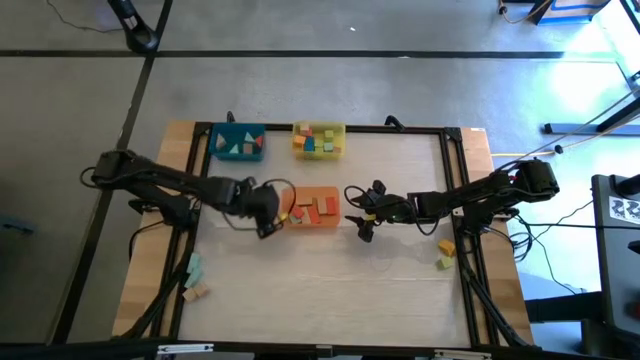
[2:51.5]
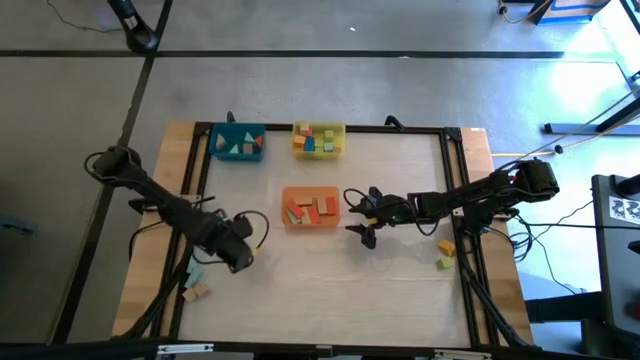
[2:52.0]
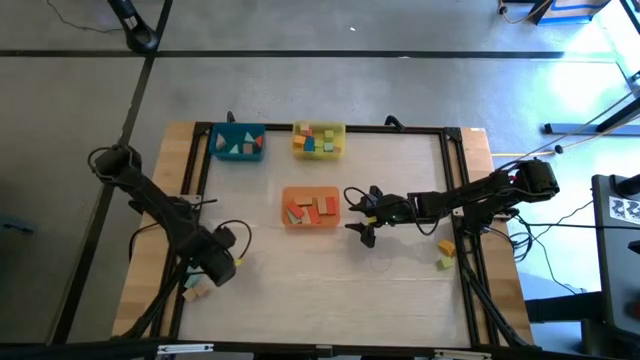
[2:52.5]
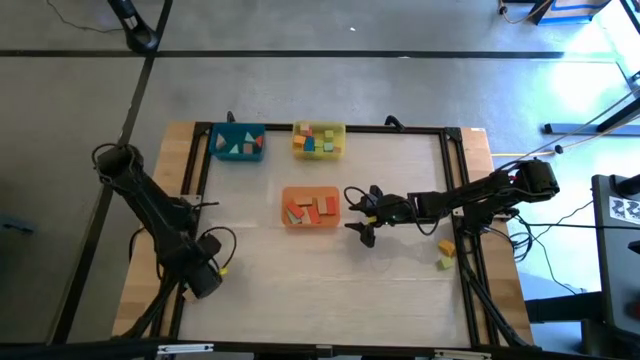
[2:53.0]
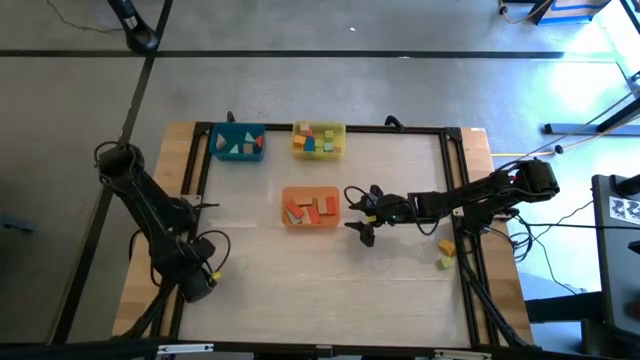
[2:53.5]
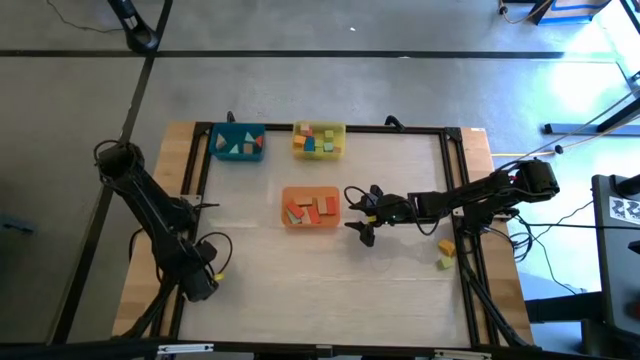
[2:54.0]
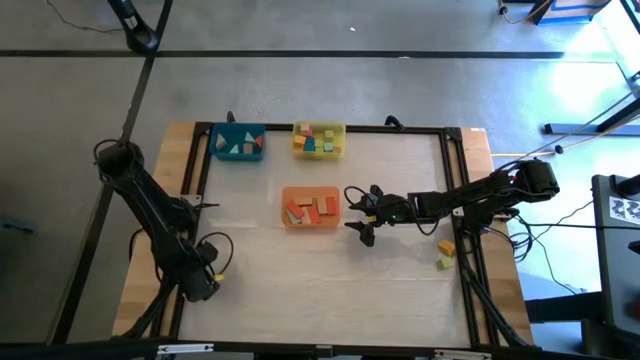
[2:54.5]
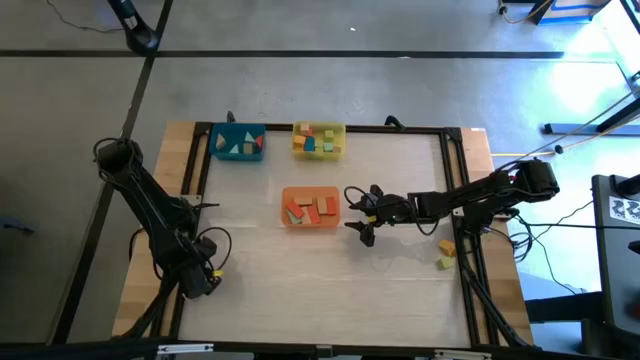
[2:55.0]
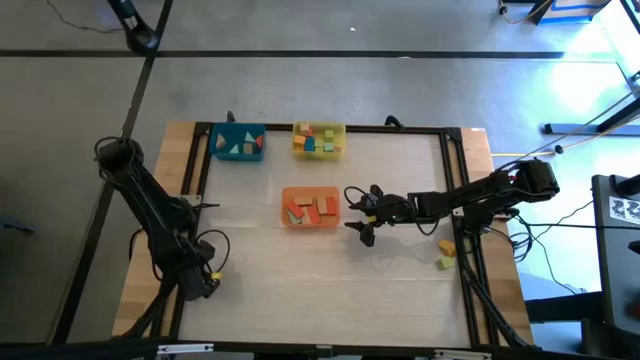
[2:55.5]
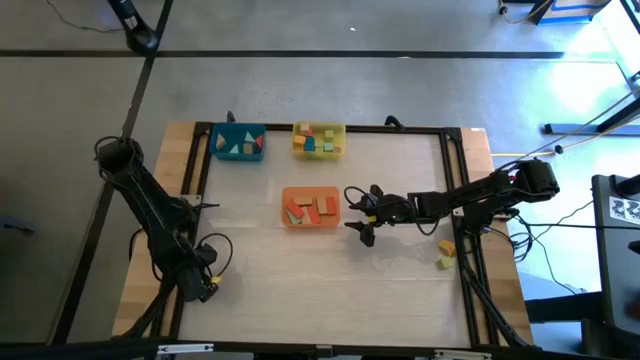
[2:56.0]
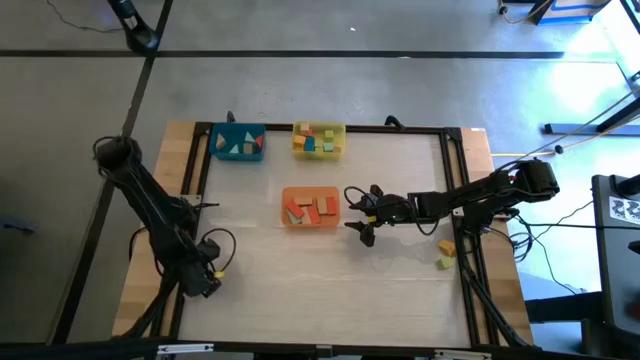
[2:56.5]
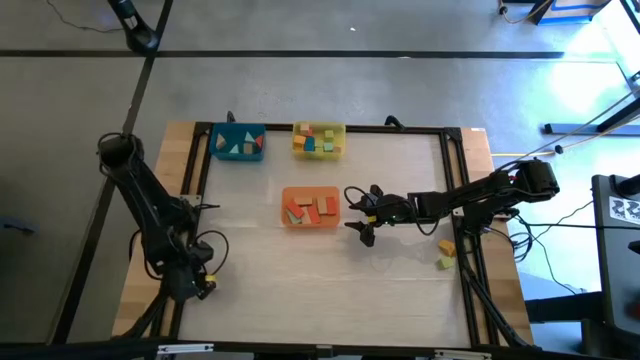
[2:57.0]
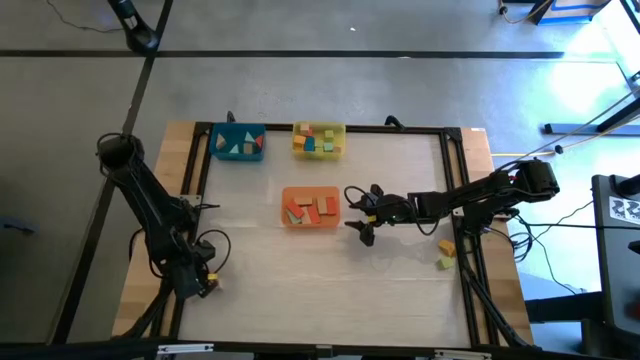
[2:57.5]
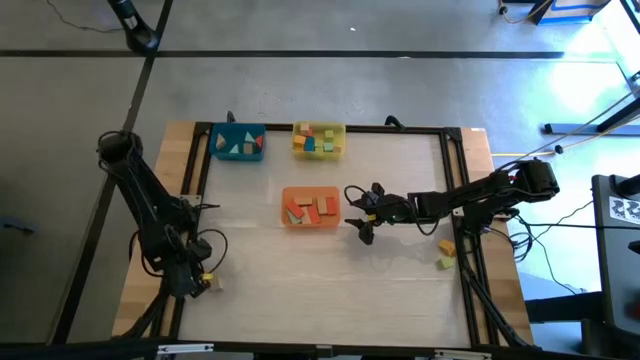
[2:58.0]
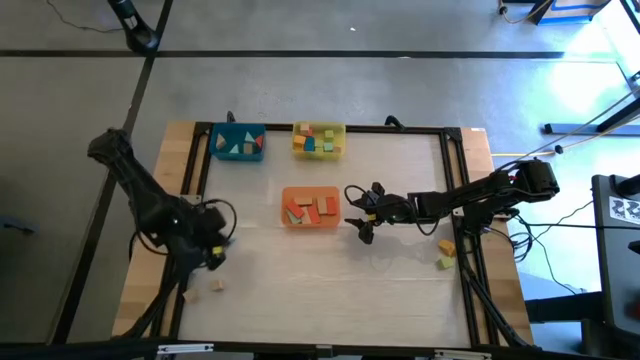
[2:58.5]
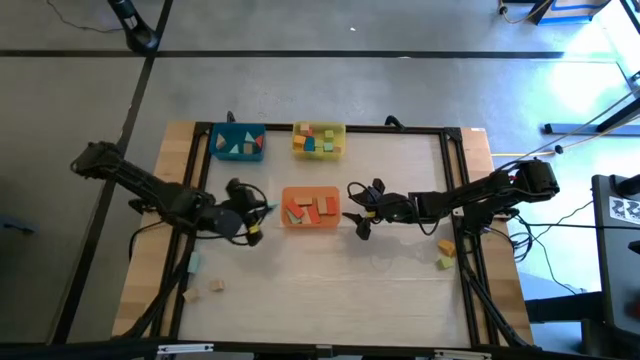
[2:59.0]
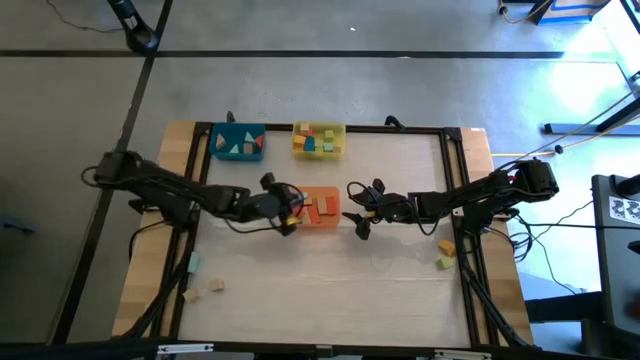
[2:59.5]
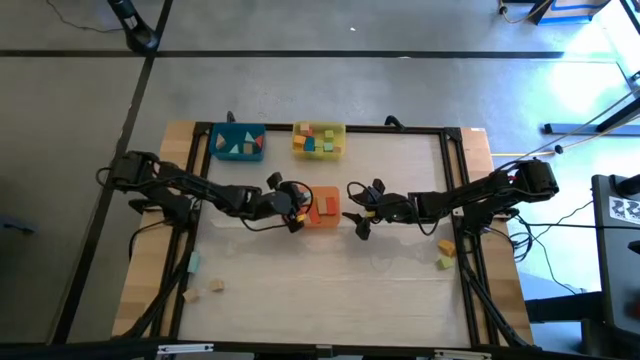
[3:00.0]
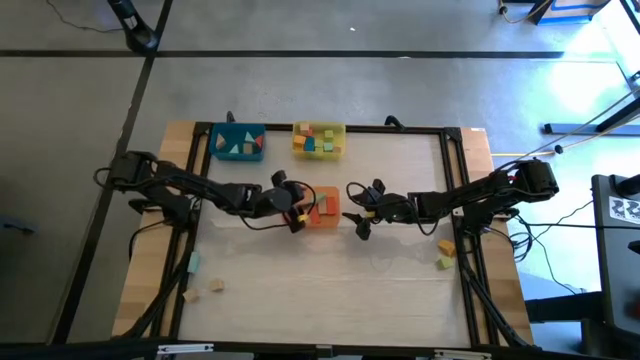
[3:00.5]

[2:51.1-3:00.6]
Task: Sort blocks by size
Put the light blue rectangle into the orange bin

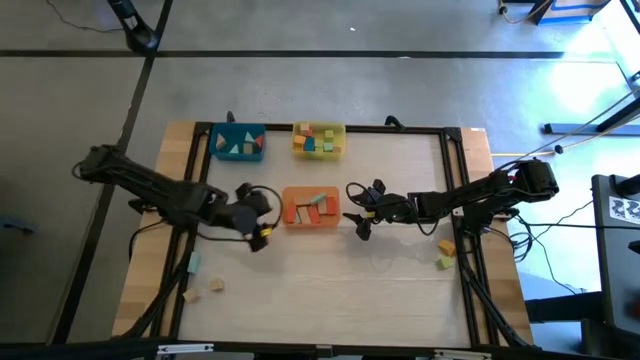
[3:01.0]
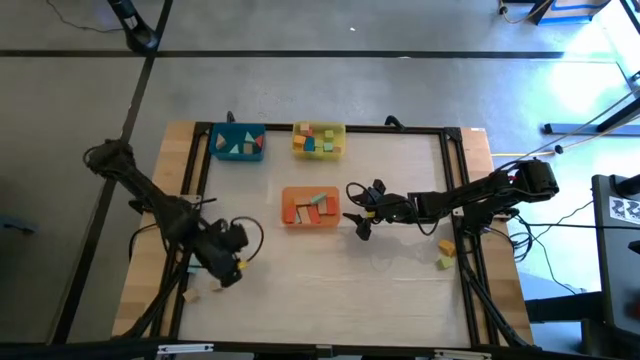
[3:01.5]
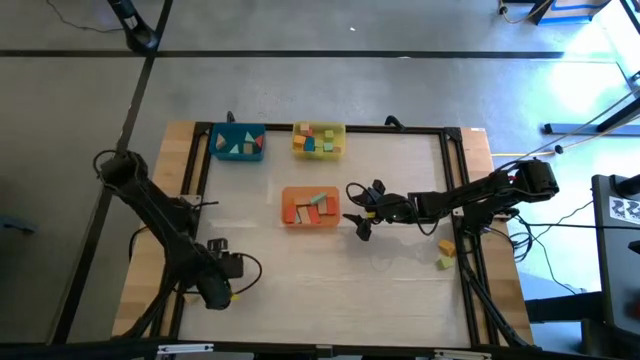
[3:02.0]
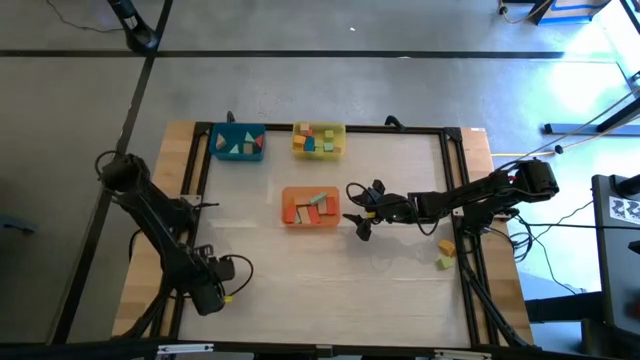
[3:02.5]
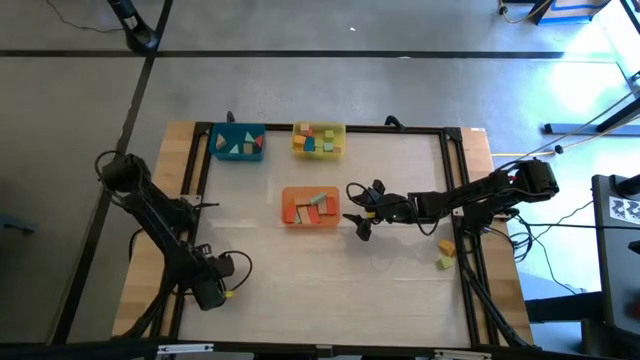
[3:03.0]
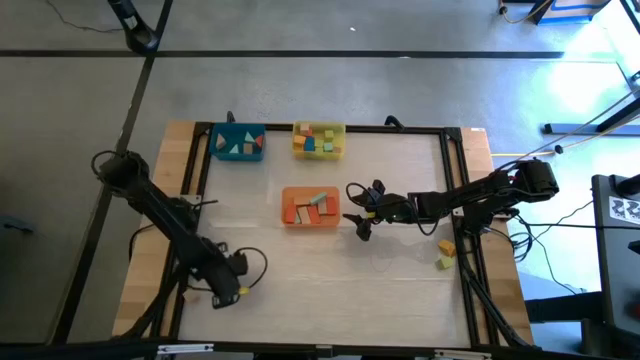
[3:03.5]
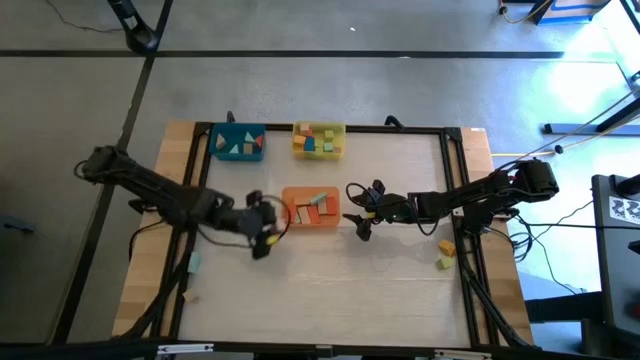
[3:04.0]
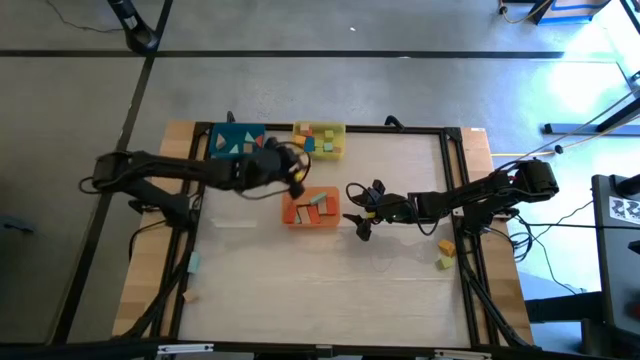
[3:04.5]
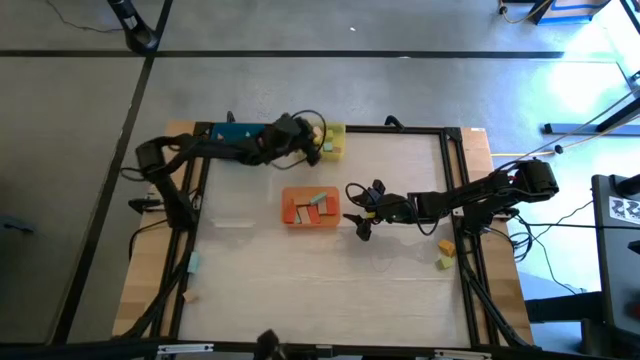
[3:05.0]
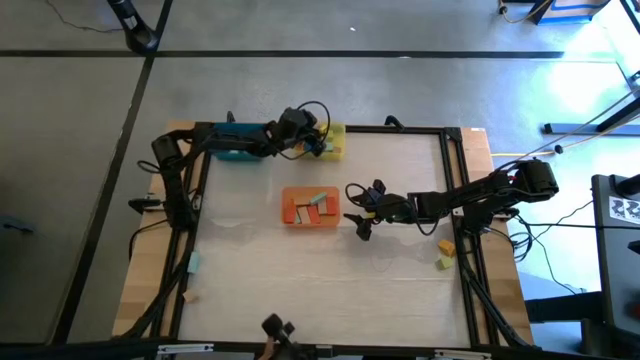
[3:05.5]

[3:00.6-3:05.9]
Put the brown square block into the yellow bin

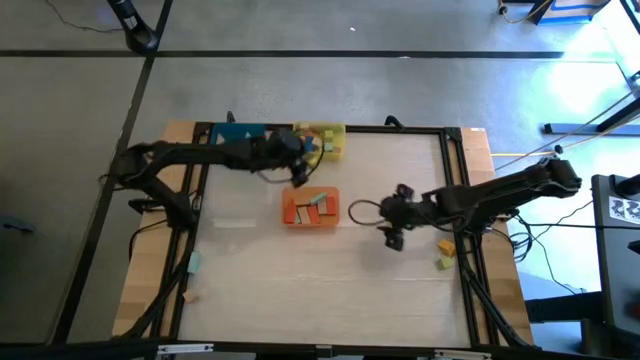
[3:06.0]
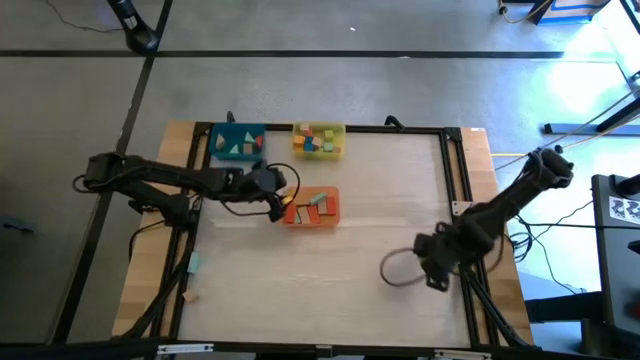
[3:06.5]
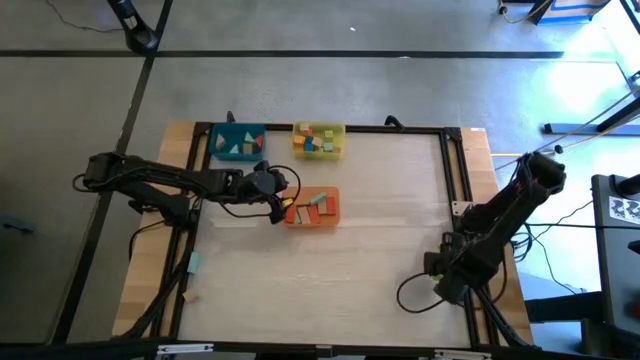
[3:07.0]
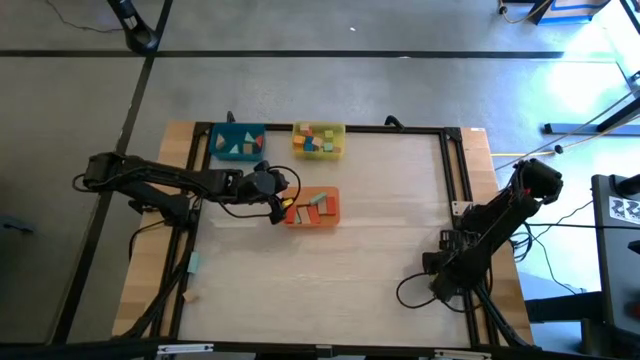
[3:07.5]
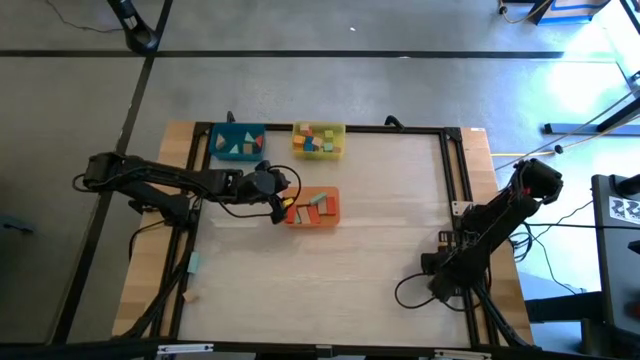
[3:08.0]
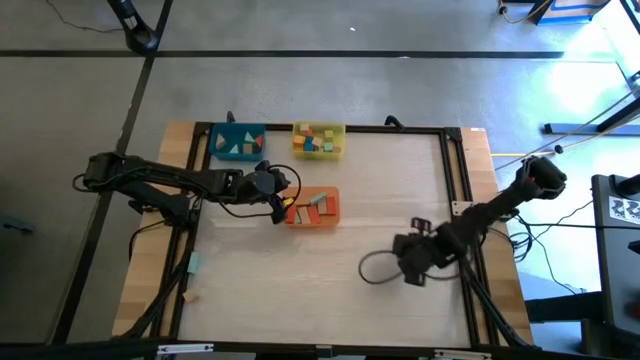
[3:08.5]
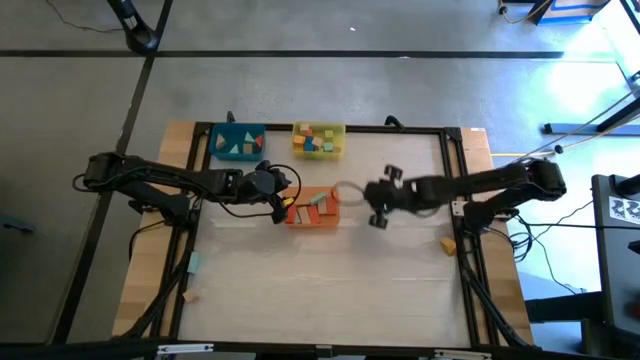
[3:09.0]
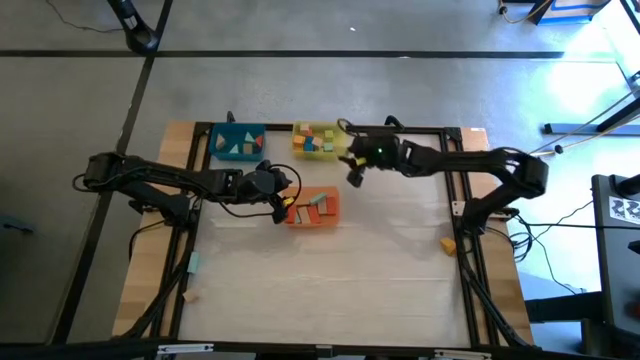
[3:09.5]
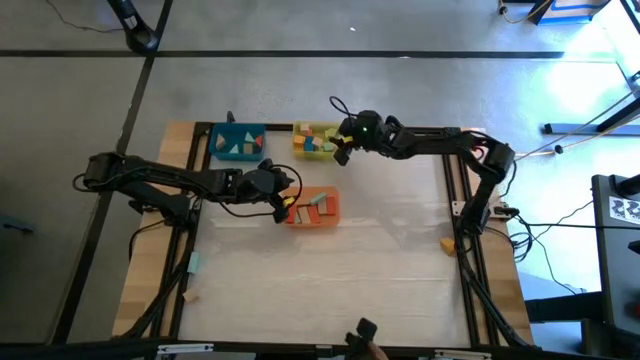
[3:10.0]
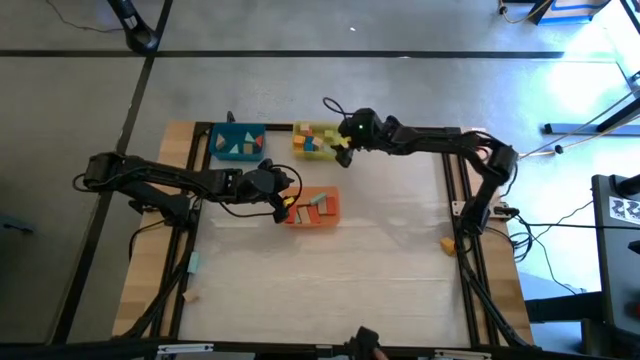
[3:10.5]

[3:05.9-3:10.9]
Put the light green square block into the yellow bin

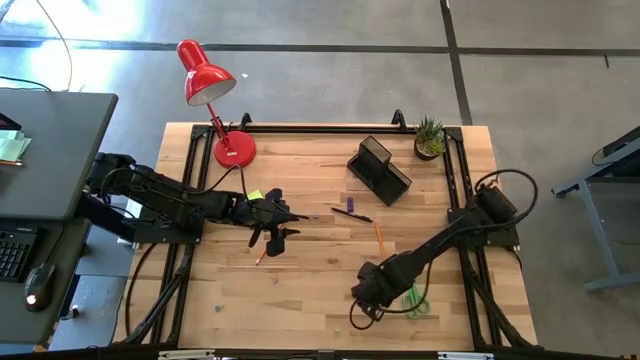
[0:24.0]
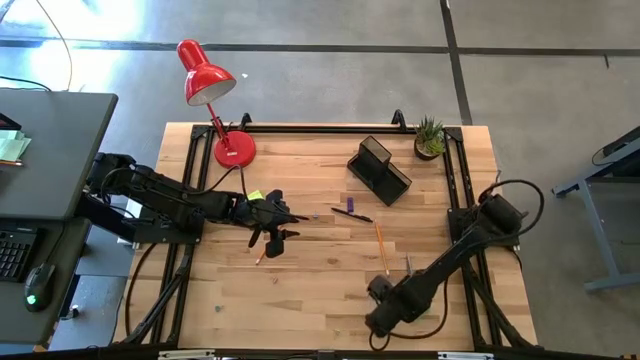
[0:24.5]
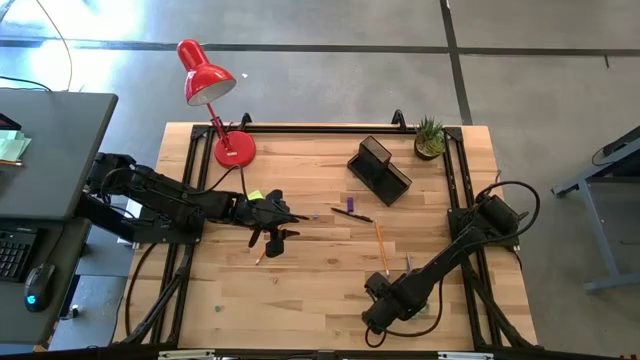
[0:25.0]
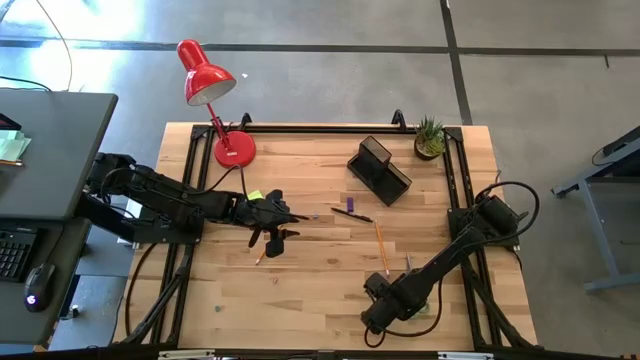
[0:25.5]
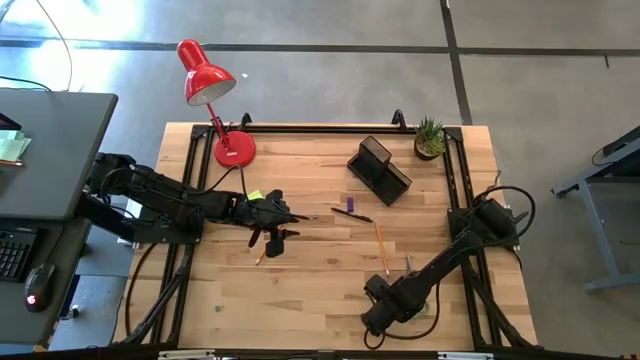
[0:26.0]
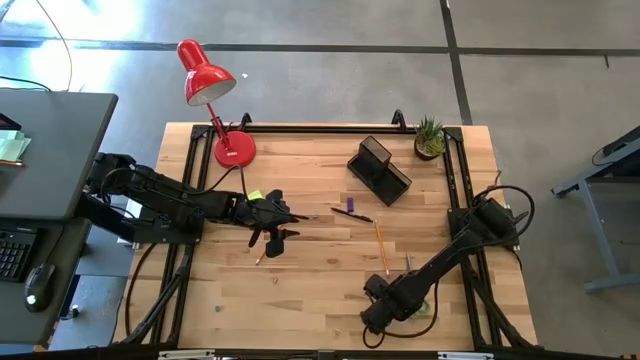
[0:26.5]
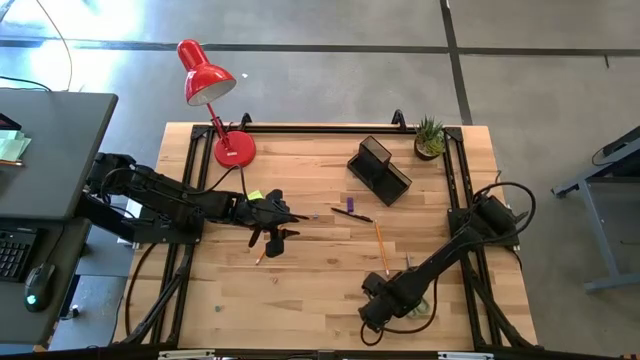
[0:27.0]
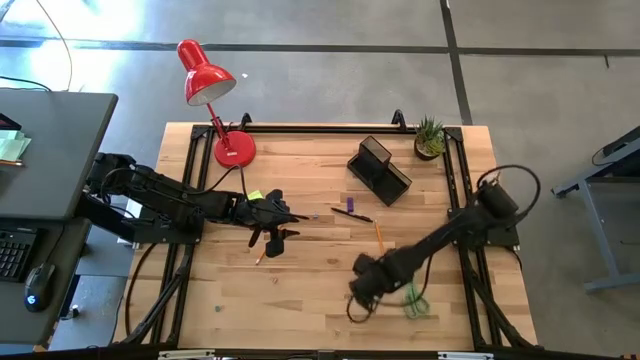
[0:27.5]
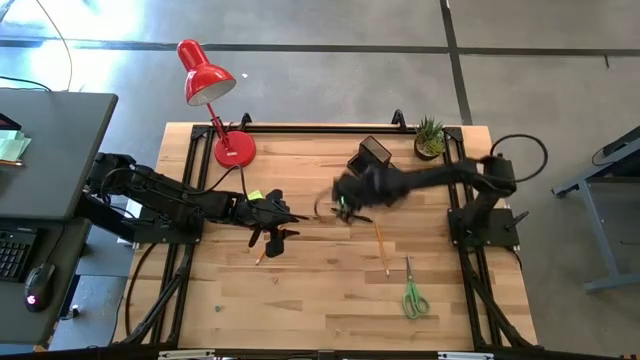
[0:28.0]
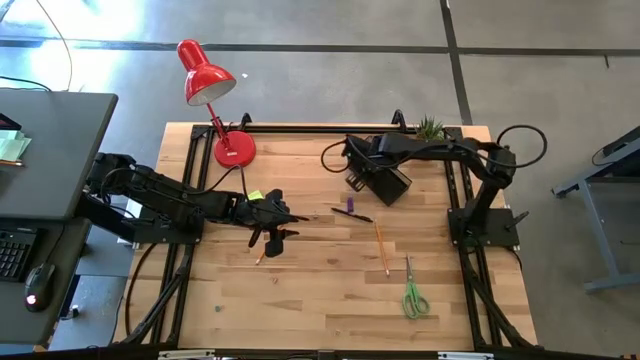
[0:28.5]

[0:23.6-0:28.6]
Task: Pick and place office supplies into organizer
Put the right blue binder clip into the black desk organizer
